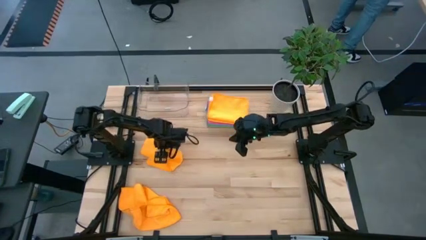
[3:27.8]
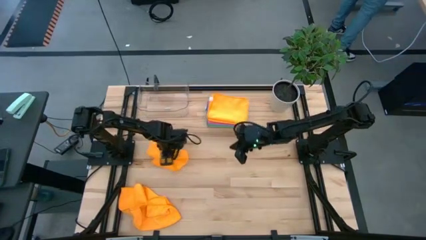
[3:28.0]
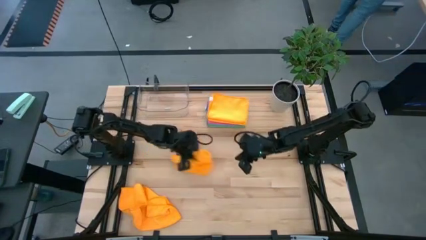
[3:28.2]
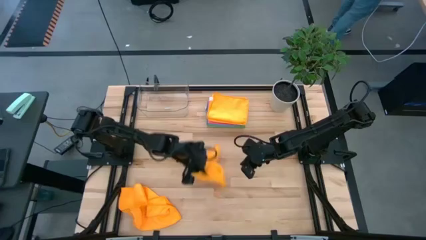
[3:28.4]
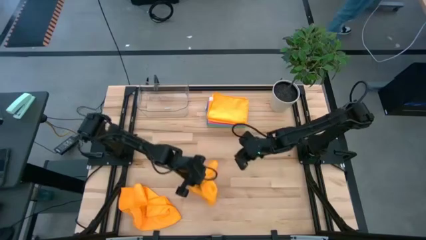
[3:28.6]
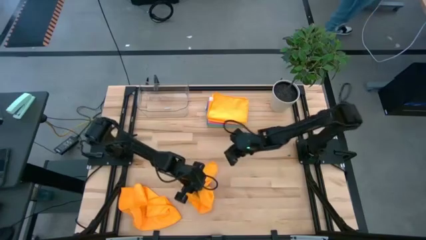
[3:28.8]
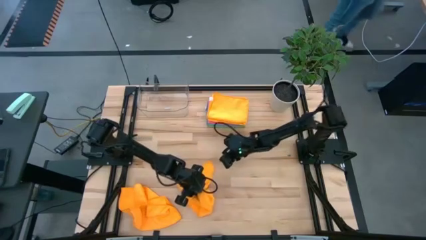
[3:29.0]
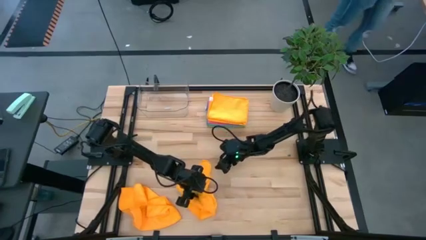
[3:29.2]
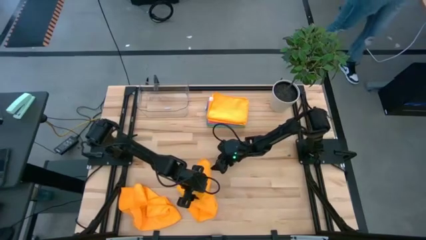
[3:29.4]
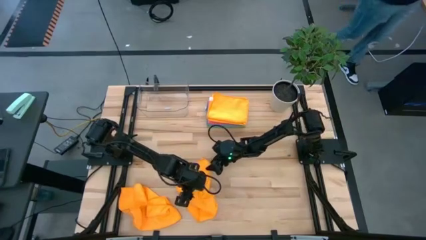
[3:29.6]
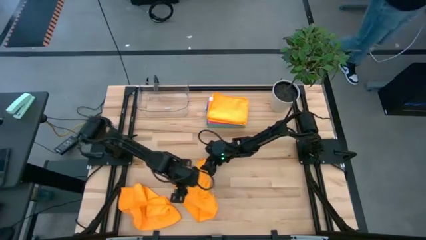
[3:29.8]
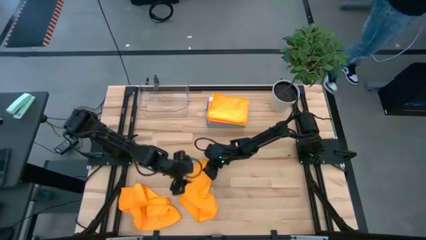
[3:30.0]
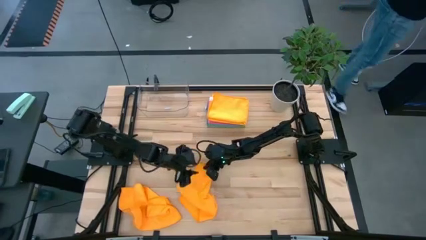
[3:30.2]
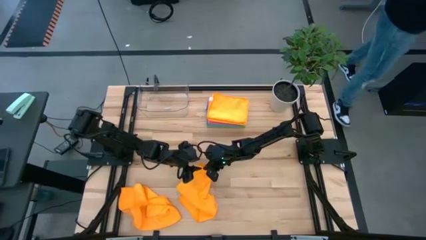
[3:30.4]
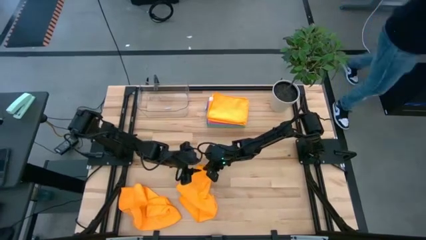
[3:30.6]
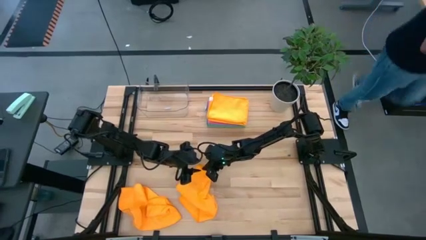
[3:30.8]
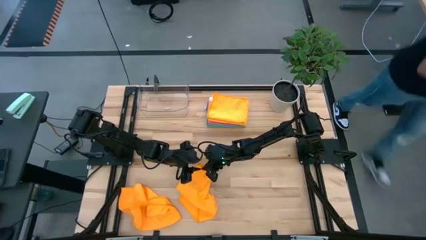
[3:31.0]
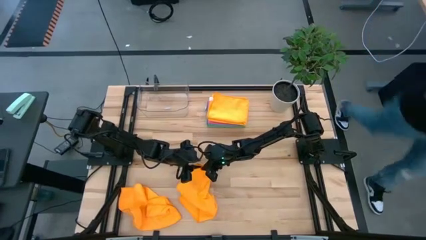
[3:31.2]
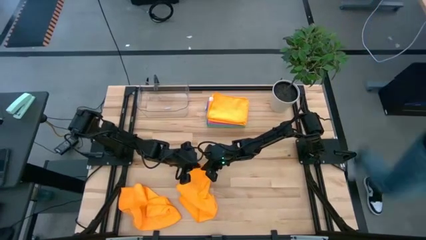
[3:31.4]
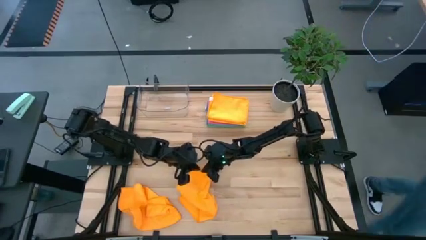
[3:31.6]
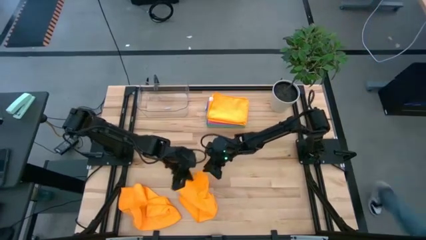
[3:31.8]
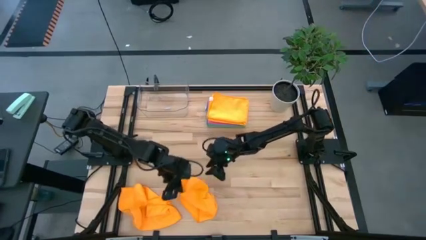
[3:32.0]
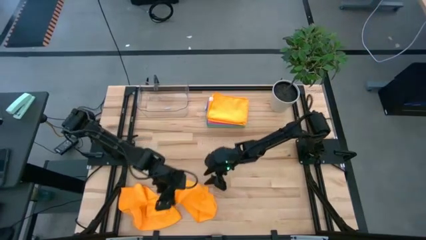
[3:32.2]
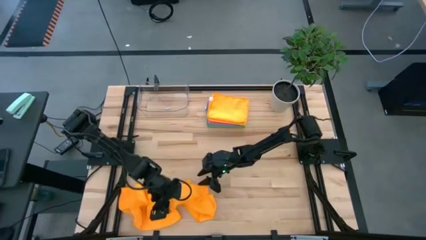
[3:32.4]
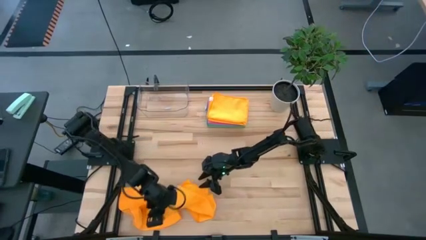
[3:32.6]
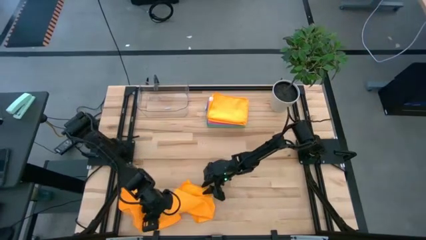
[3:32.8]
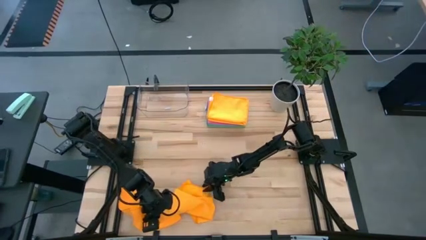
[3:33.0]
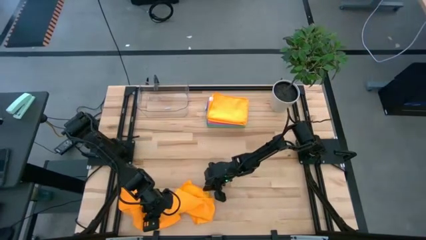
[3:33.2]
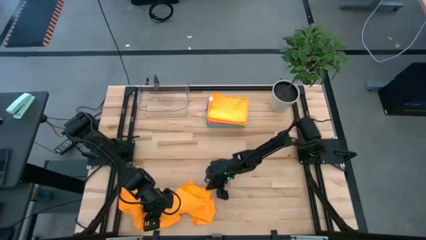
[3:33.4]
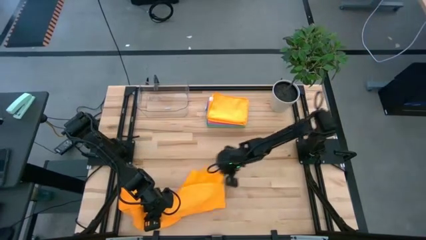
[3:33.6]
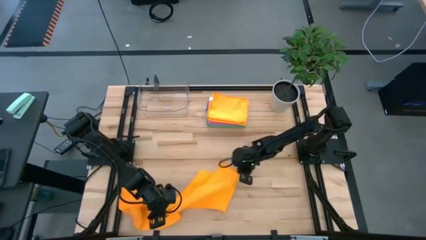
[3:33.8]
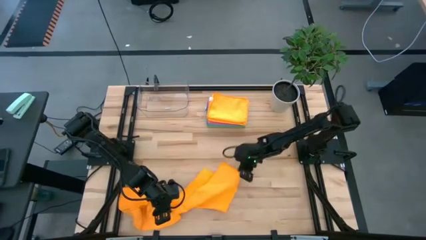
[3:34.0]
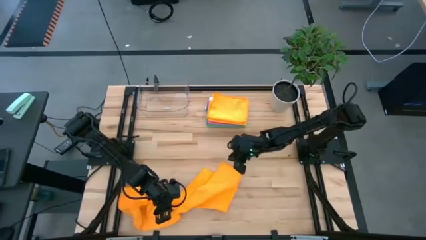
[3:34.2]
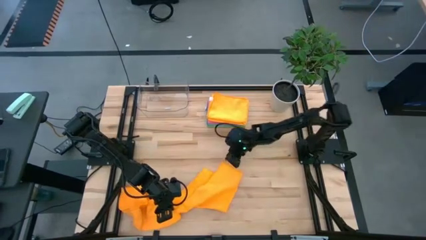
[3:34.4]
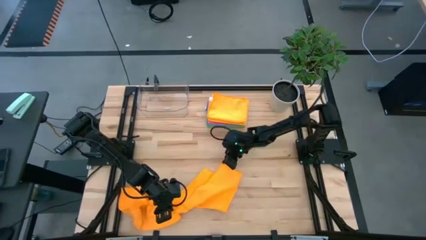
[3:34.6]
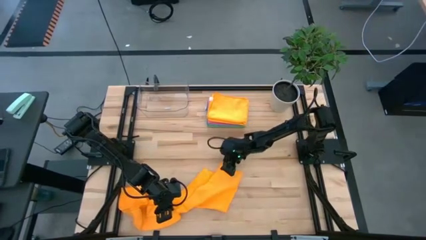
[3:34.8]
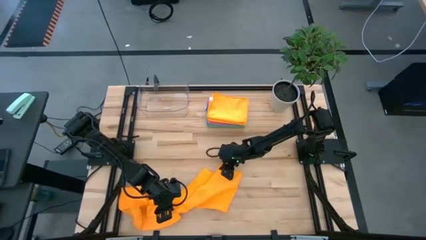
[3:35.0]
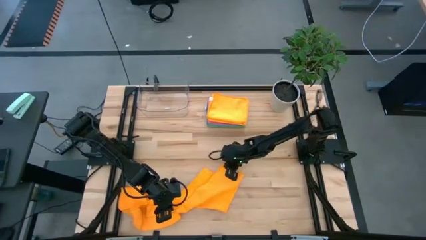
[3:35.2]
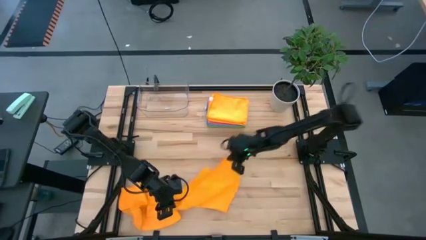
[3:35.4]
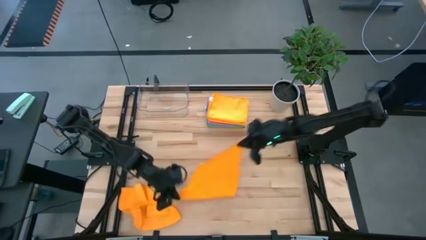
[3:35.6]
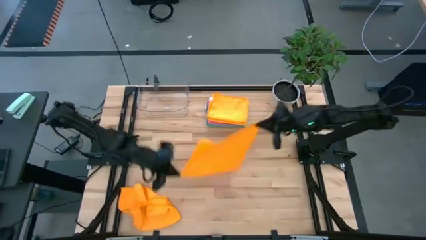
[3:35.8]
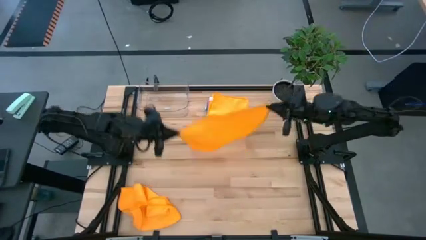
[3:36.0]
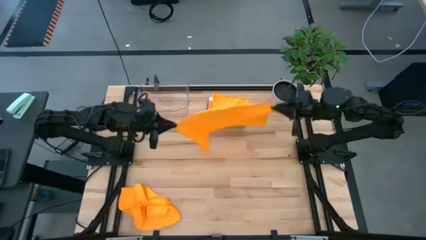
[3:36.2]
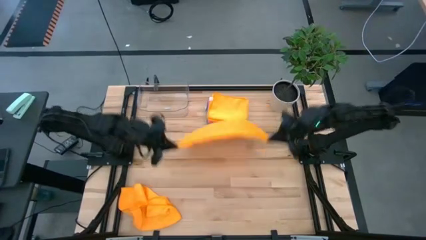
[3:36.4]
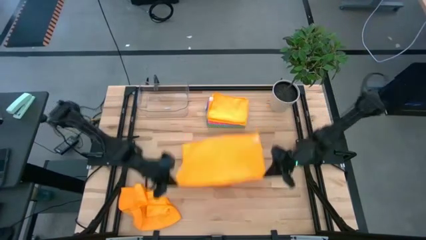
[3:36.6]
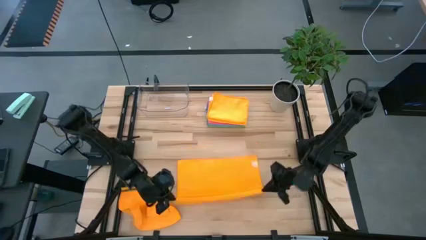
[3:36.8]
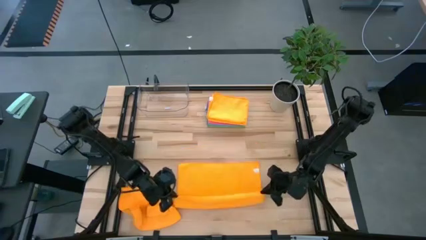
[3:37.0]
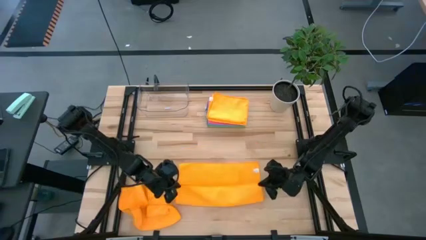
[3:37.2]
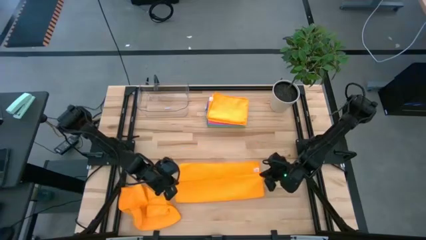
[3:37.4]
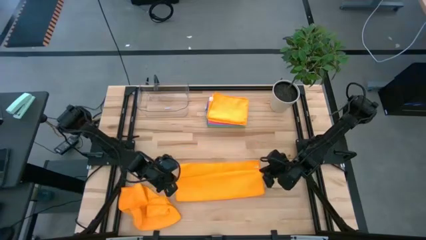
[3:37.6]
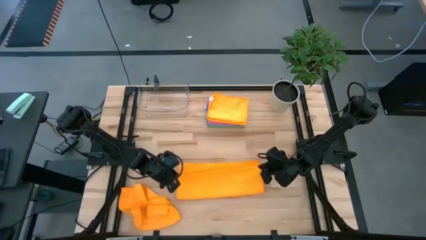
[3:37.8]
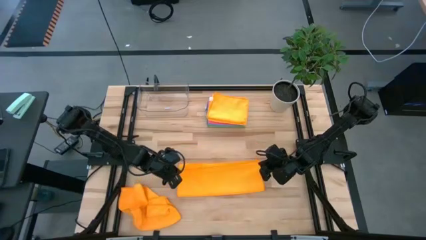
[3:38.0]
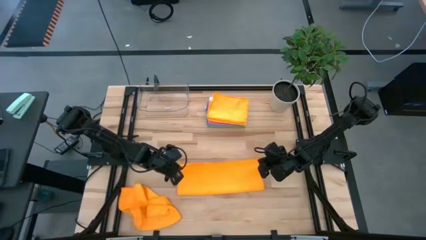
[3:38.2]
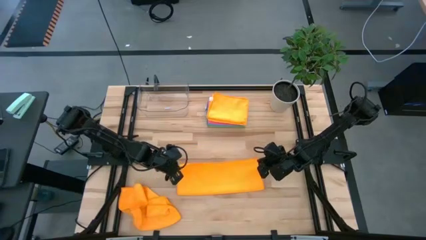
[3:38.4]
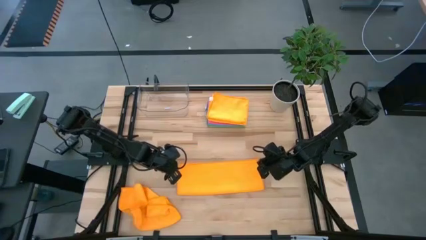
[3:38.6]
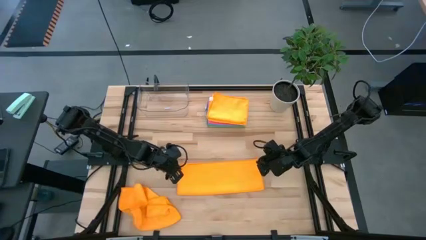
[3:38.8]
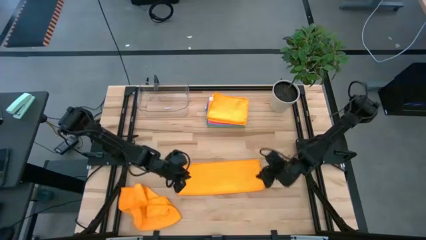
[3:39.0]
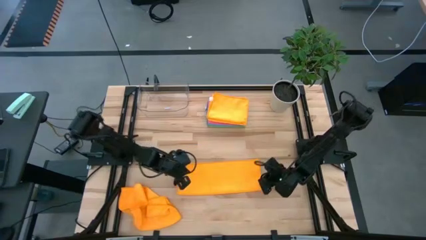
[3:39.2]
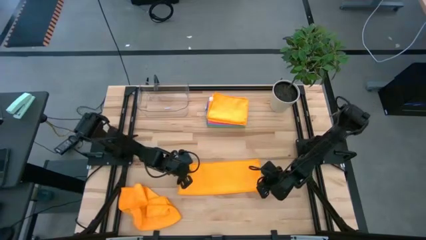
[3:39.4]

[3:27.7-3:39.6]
Task: Fold microfiber towels
Fold the top yellow towel

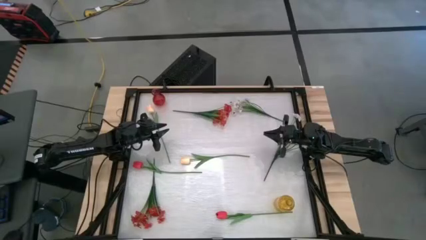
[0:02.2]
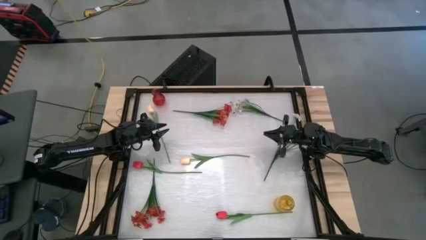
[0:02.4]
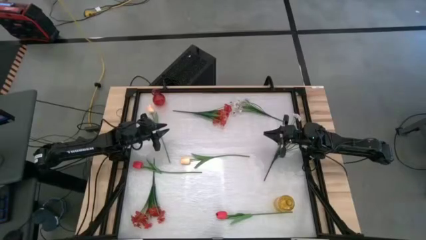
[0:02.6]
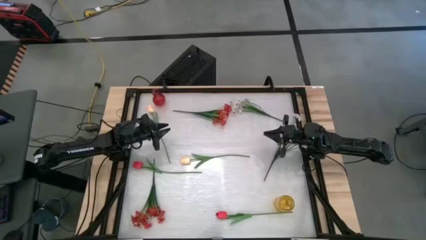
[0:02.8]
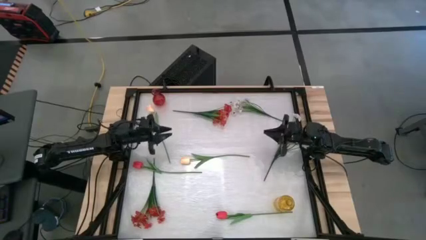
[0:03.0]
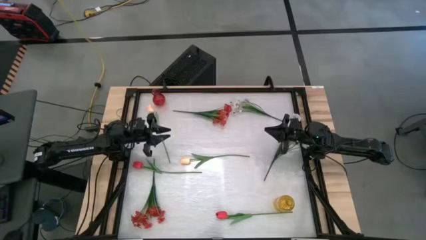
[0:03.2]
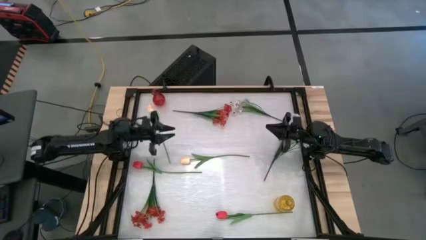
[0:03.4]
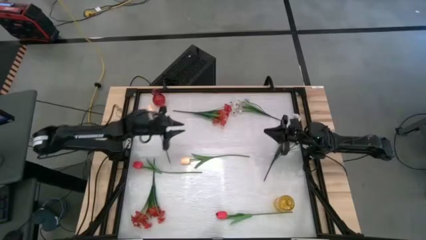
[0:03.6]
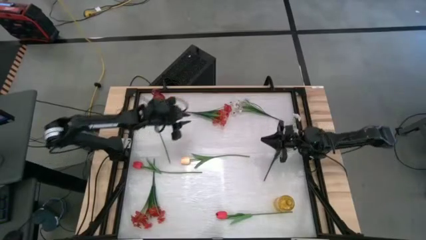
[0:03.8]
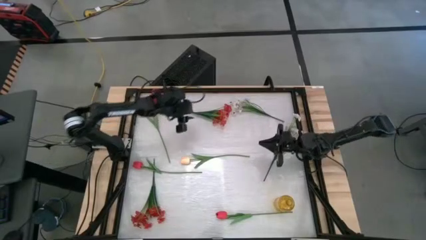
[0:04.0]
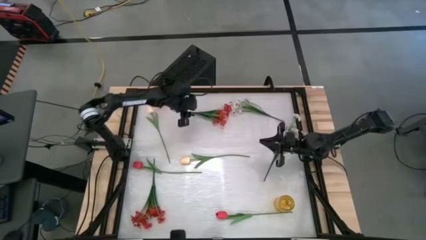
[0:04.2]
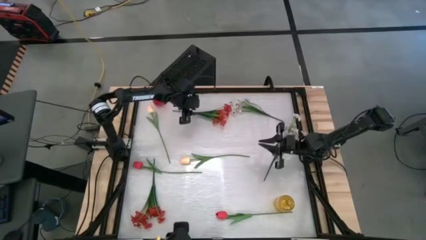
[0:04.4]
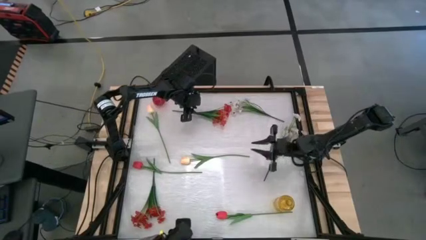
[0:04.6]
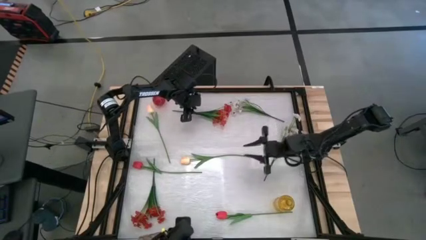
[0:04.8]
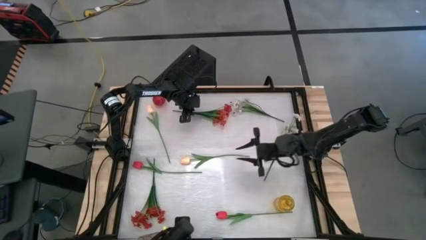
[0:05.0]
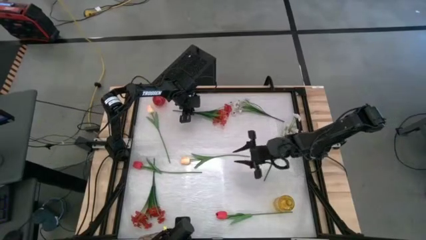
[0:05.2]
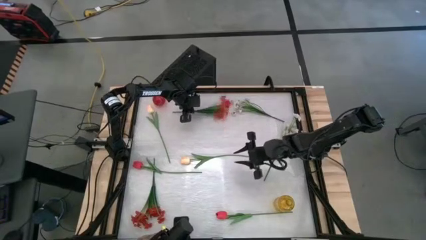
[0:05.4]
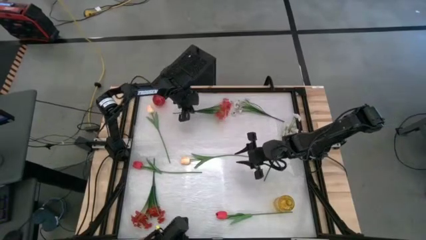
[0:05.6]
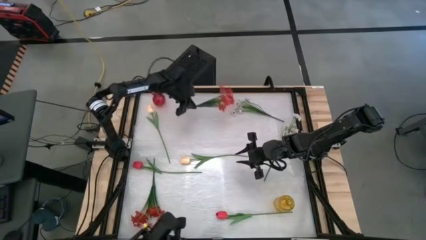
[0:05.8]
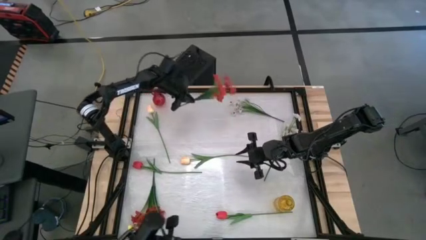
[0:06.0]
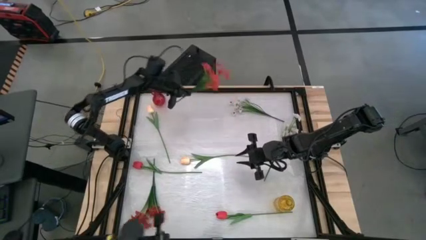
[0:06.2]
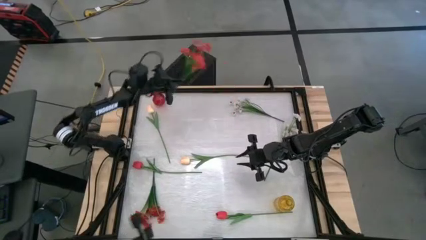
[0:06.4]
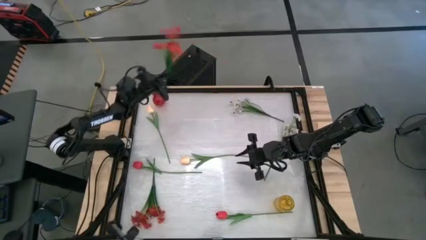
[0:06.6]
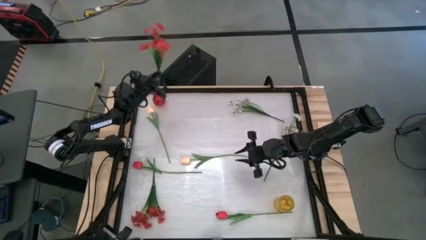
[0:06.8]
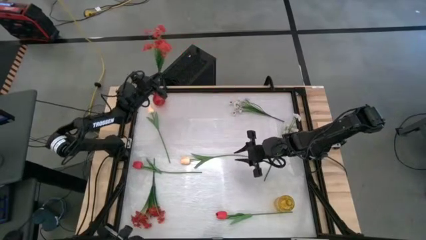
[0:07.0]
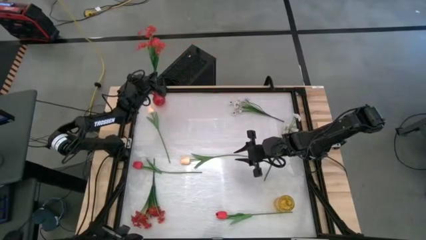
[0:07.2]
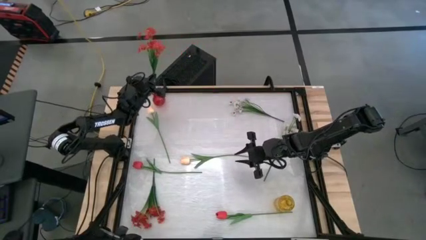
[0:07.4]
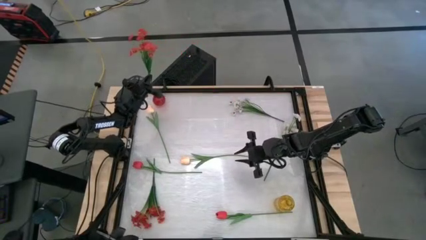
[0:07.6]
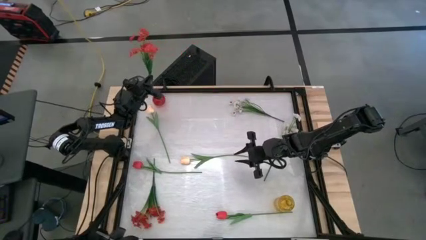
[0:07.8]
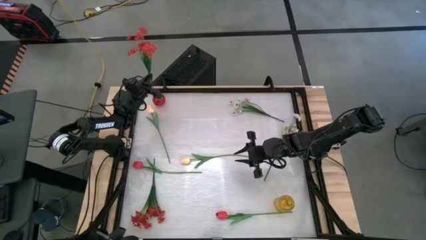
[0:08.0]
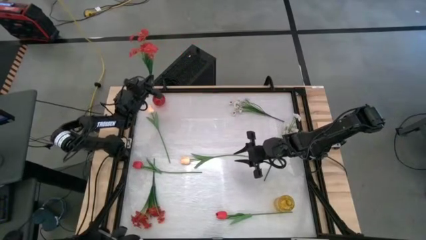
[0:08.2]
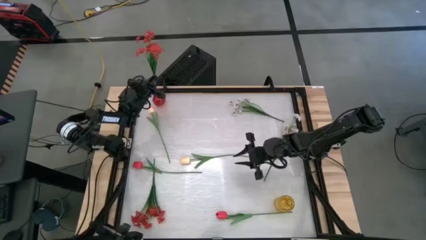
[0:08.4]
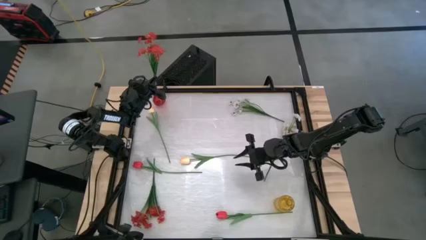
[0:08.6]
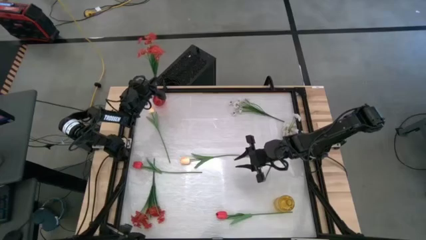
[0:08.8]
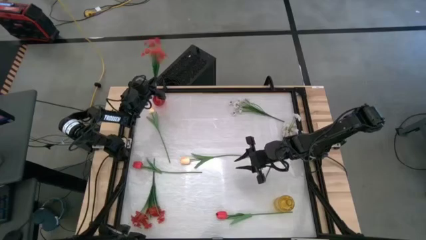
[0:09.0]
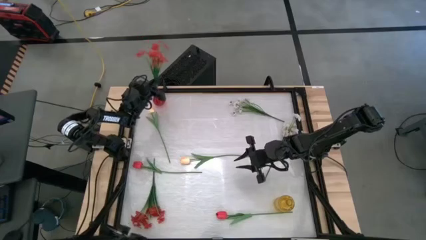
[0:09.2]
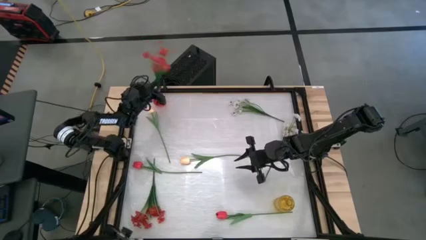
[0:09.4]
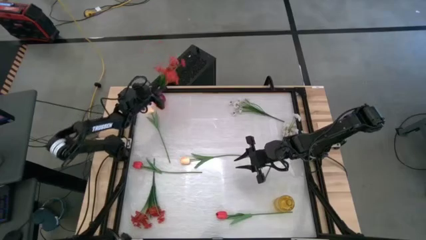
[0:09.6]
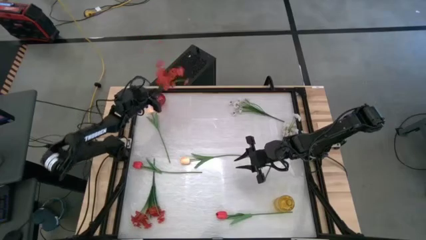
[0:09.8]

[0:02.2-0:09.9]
Task: Sort flowers into vase by color
Put the top red flower into the transparent red vase
